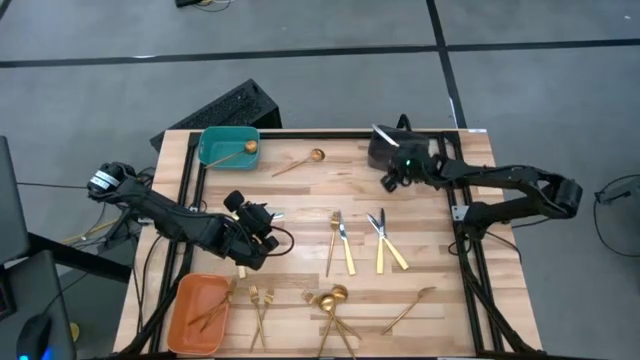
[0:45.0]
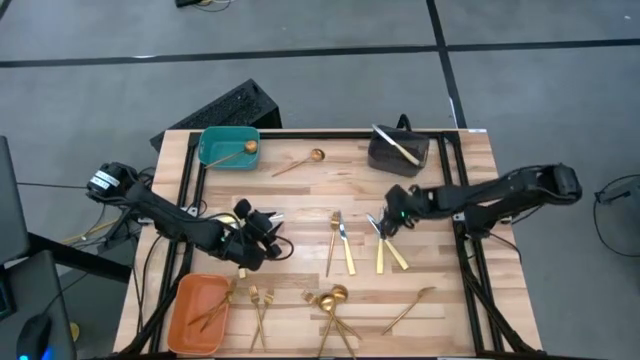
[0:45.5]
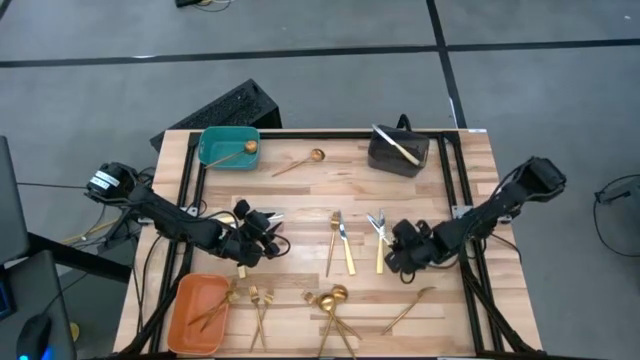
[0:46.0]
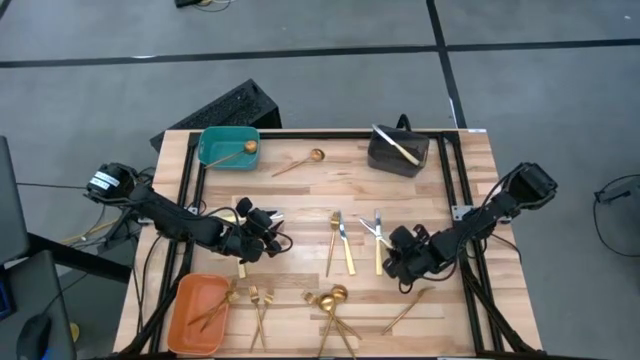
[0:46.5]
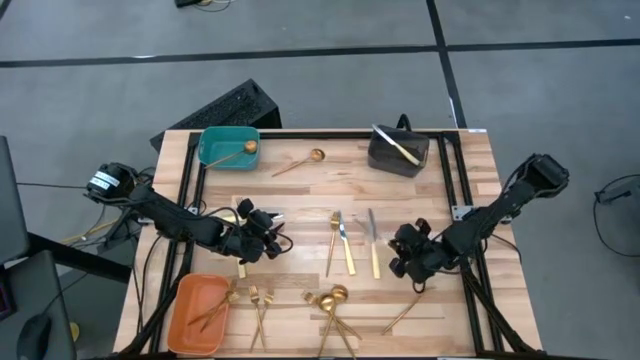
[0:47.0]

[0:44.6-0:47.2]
Task: Sort silverware by color (type)
Put the knife into the black bin

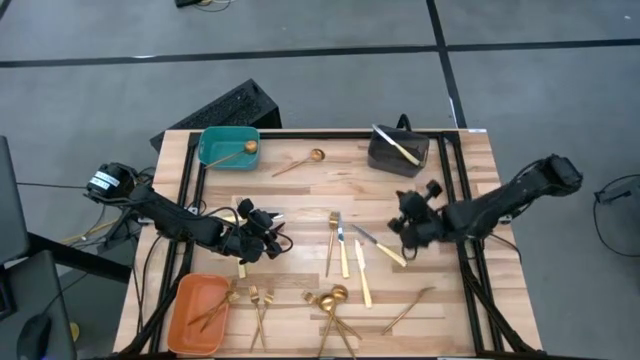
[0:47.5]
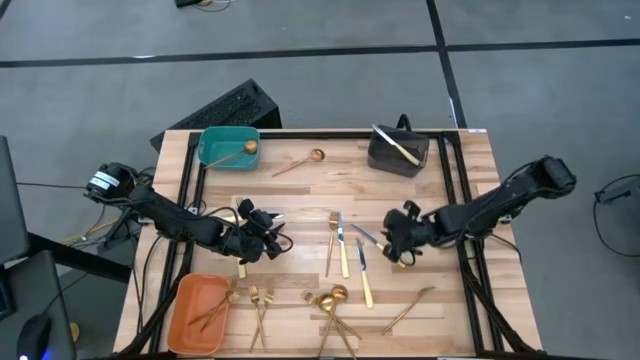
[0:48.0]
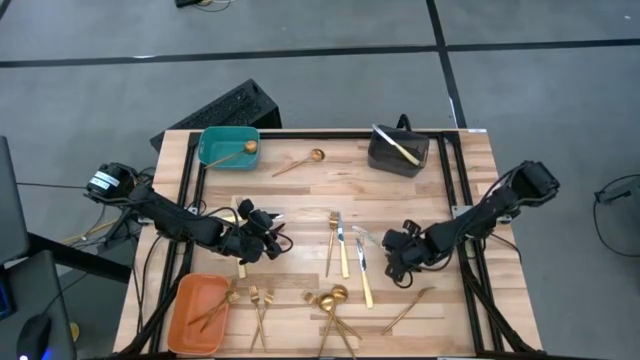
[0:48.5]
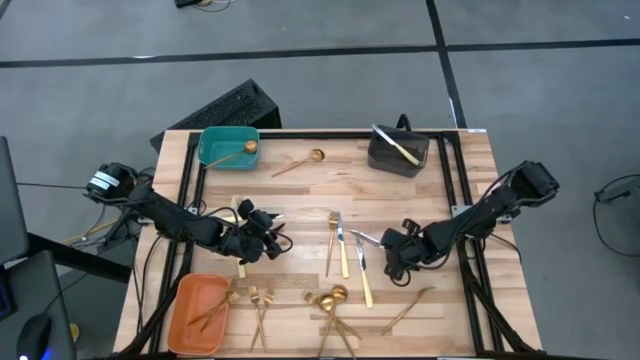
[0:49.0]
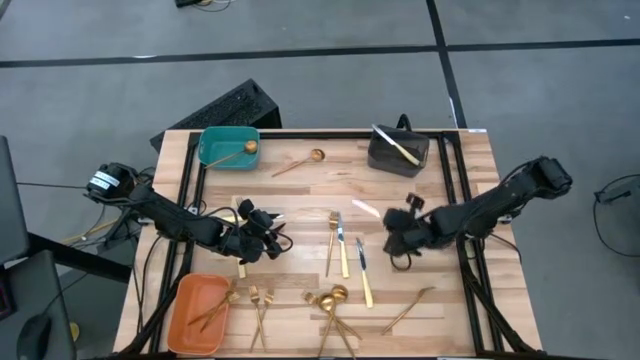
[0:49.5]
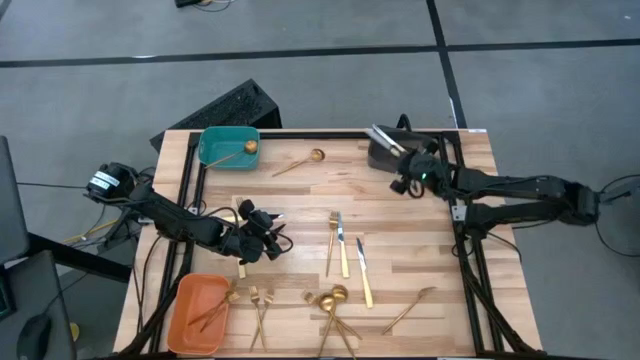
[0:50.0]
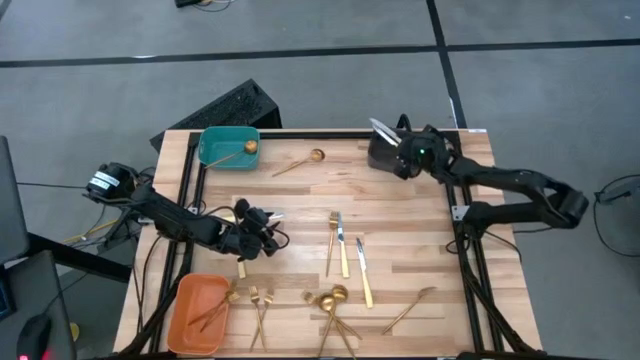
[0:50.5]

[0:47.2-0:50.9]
Put the knife into the black bin

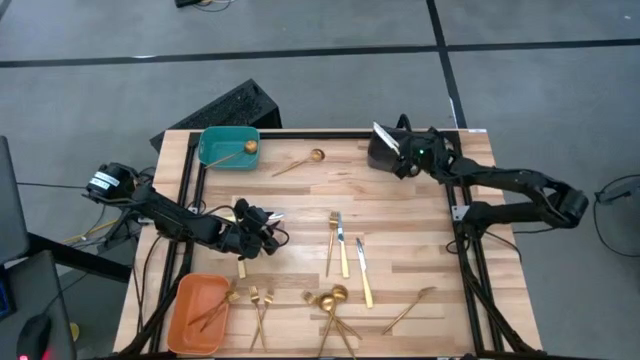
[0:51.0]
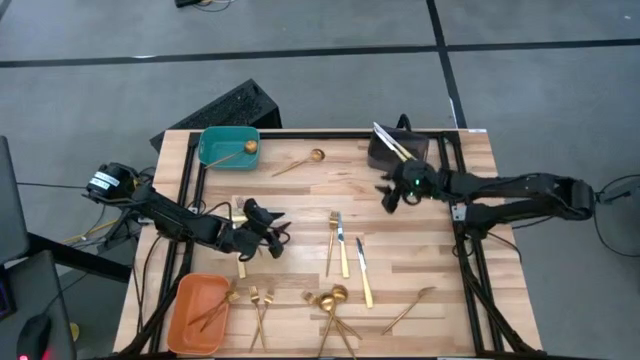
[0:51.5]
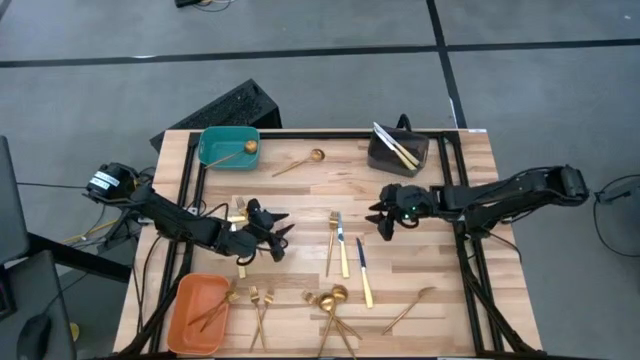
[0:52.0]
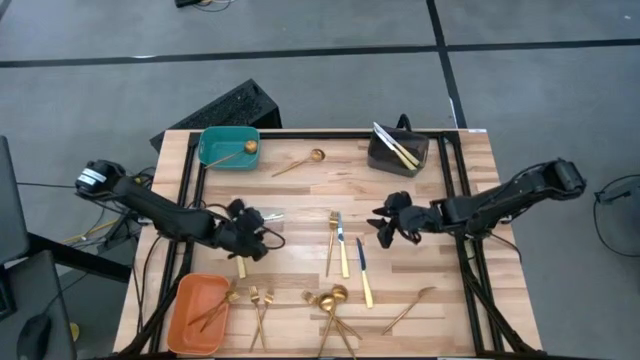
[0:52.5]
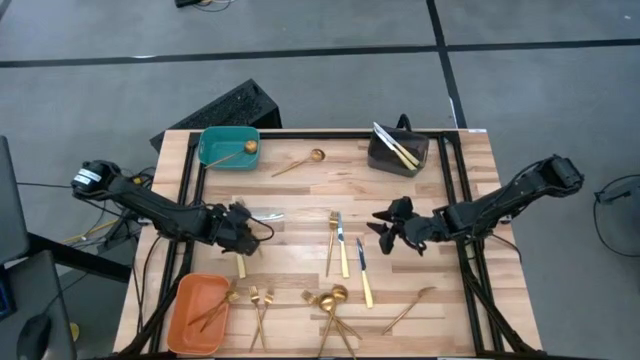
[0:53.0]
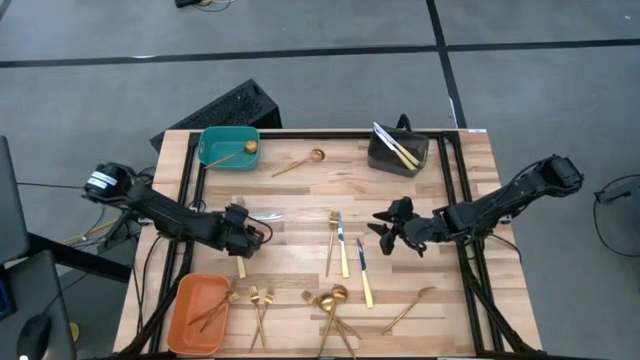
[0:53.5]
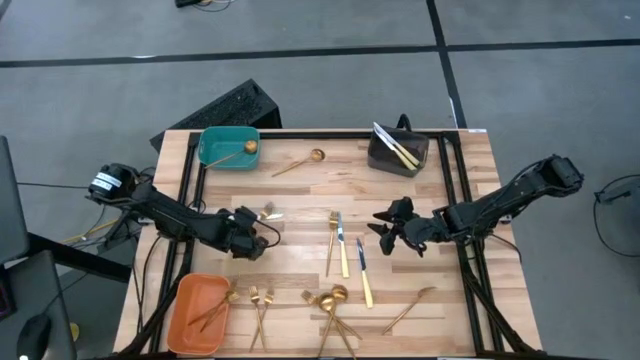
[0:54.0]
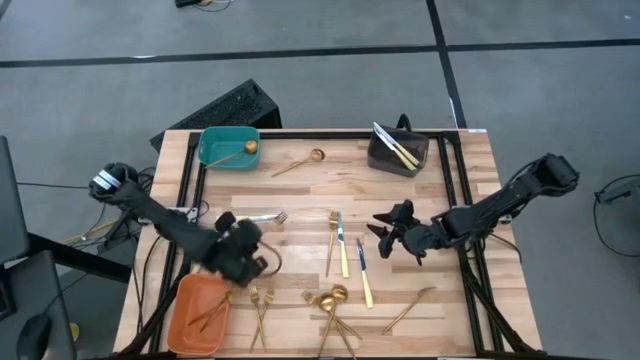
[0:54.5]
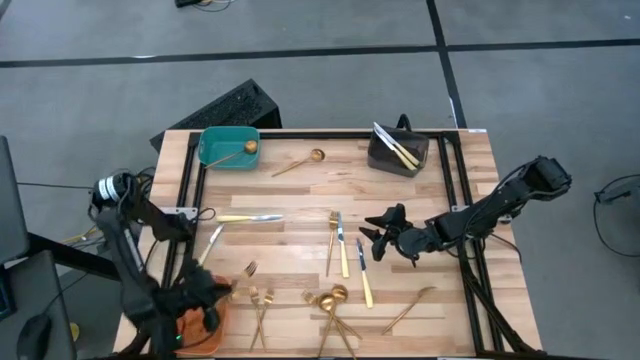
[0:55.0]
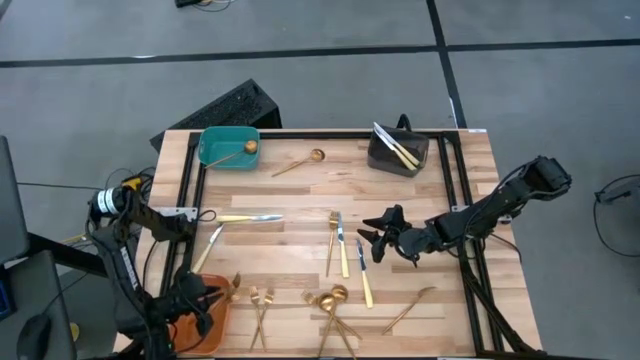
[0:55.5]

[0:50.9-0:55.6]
Put the fork into the orange bin

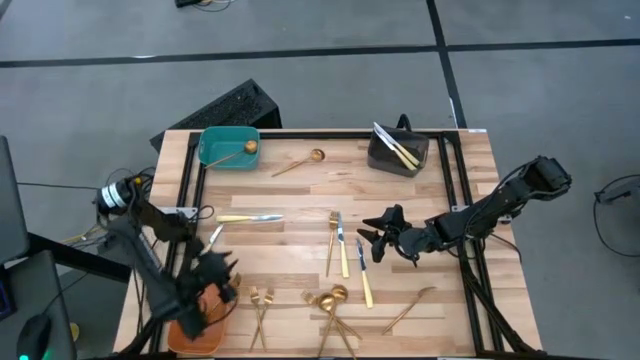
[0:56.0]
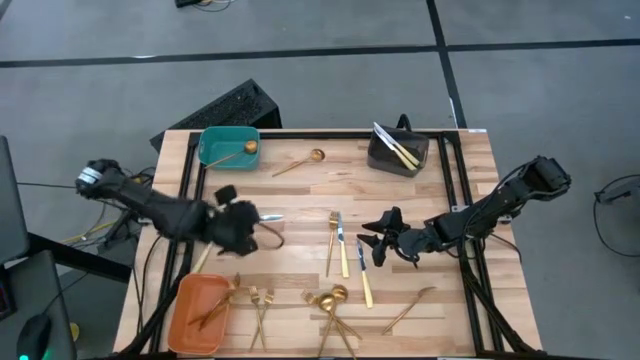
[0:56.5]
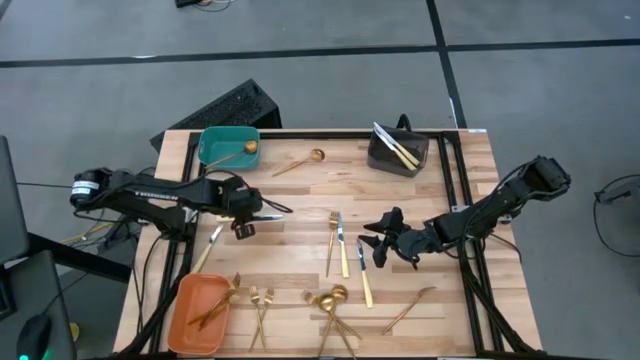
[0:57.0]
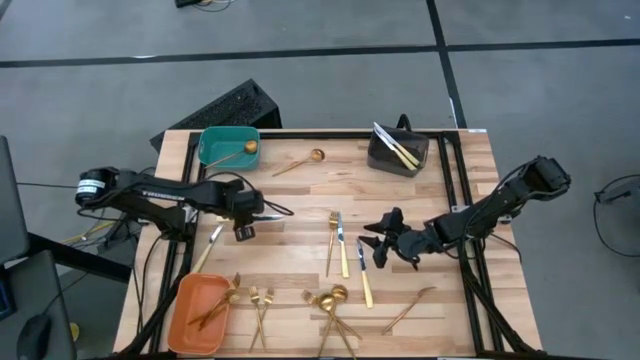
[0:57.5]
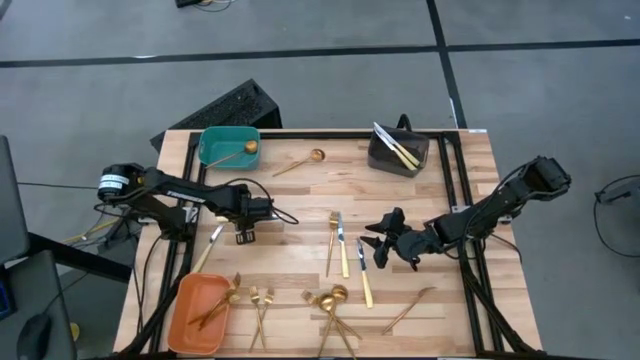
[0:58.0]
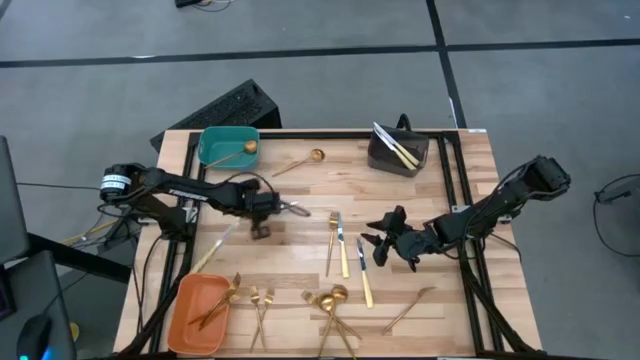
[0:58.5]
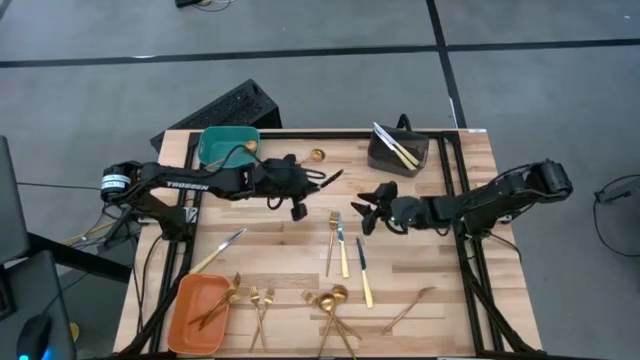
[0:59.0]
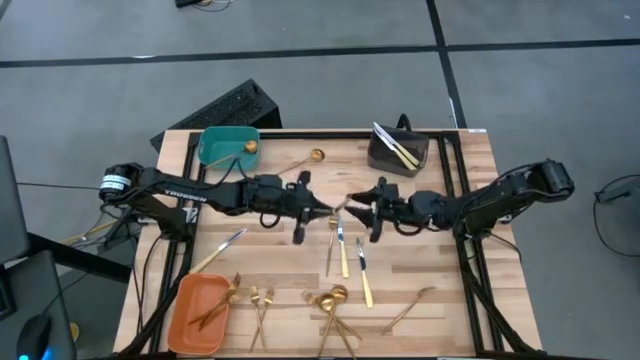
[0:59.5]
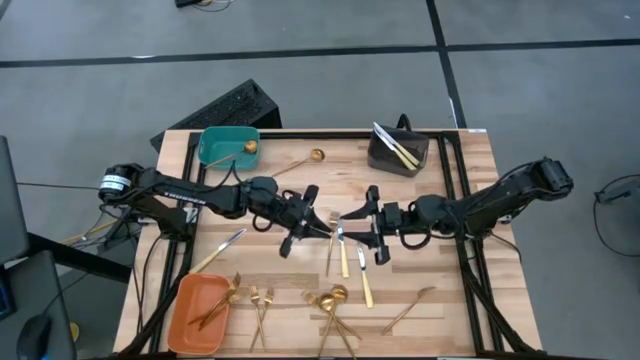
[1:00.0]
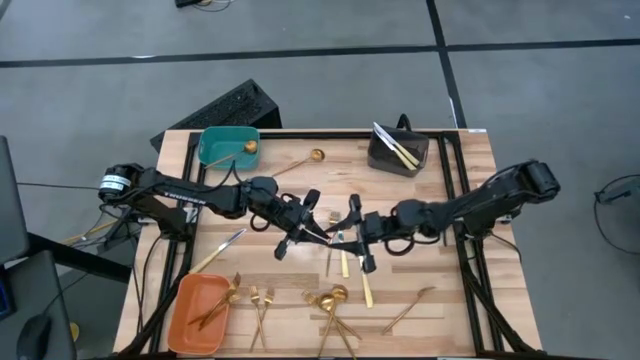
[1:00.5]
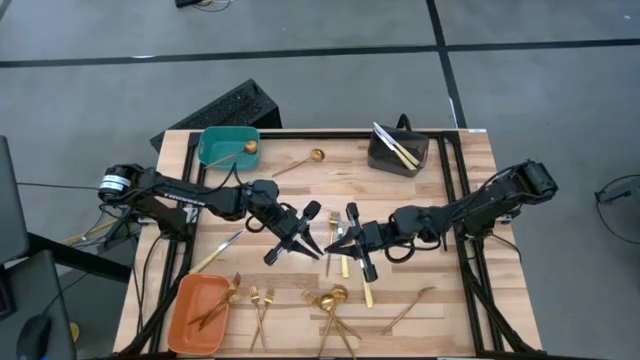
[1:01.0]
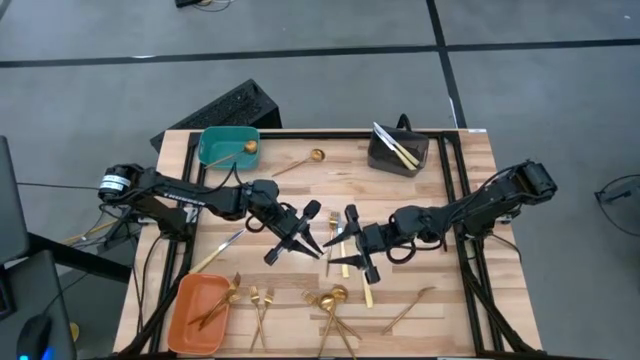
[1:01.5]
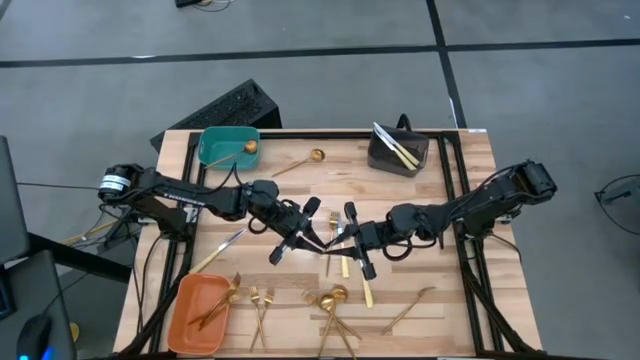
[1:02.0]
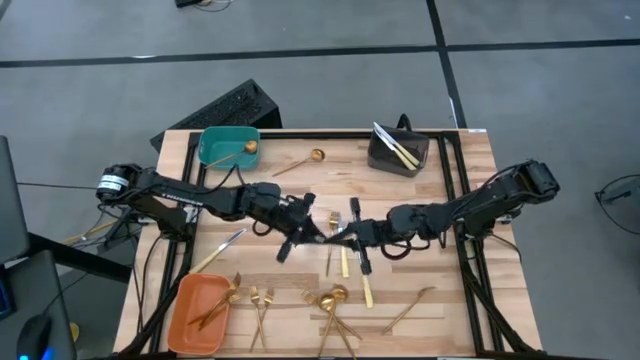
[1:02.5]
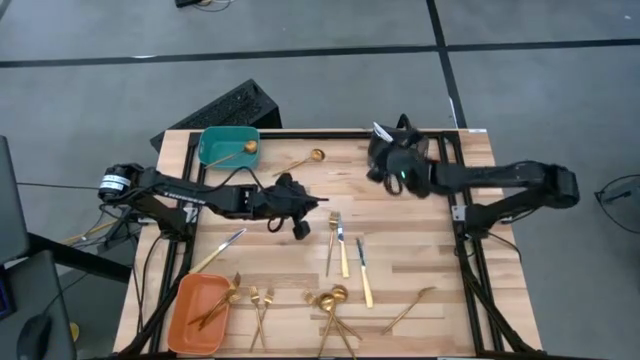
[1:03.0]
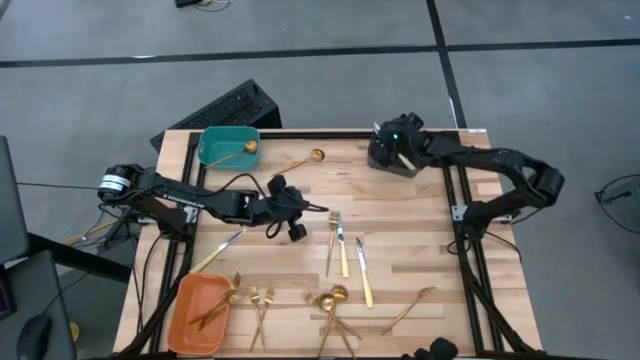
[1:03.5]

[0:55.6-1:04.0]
Put the knife into the black bin

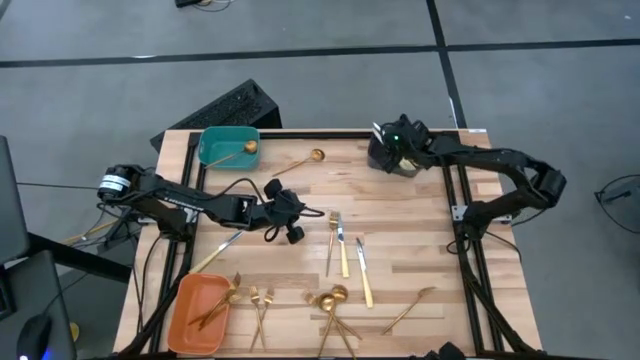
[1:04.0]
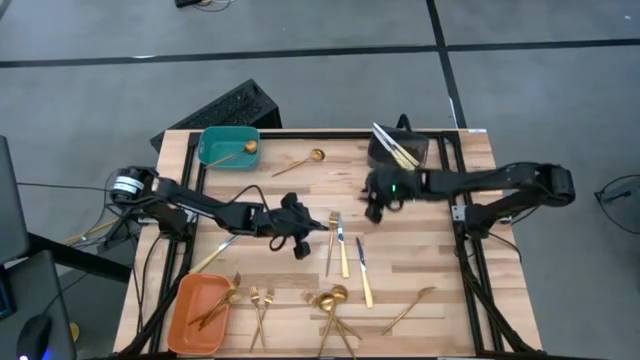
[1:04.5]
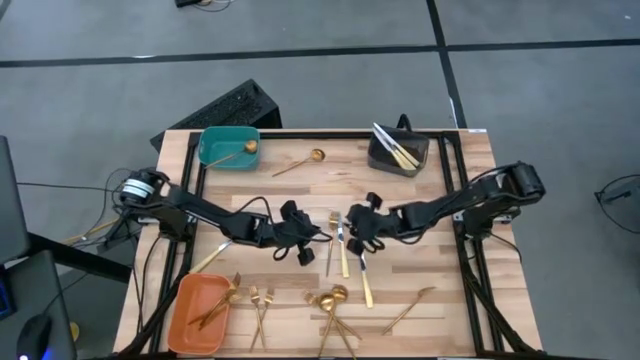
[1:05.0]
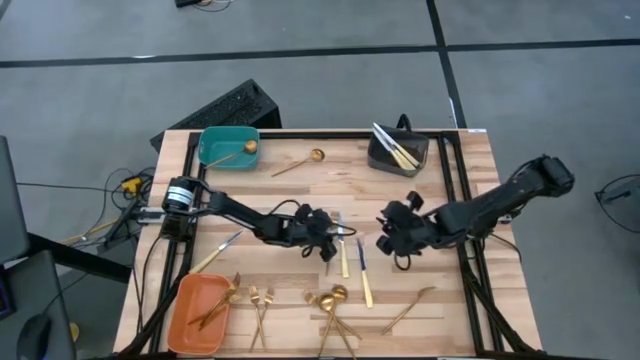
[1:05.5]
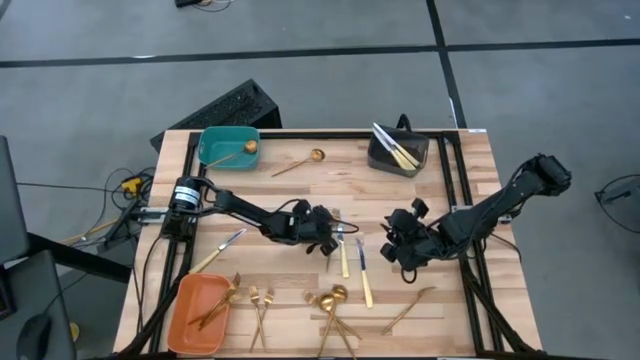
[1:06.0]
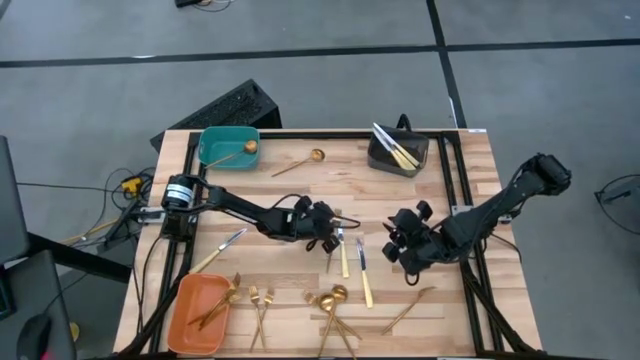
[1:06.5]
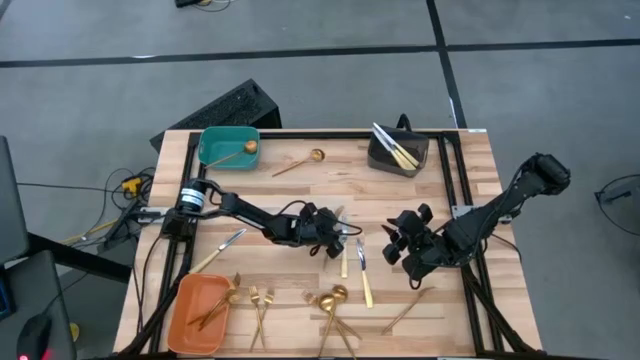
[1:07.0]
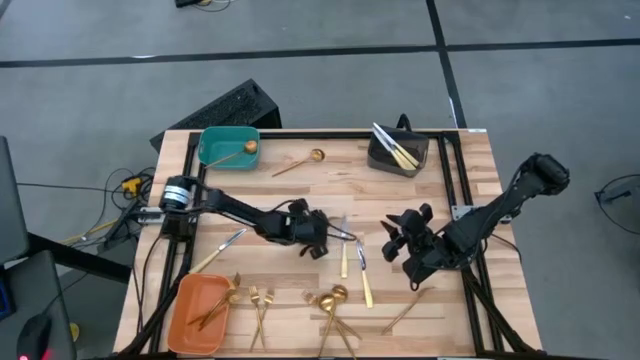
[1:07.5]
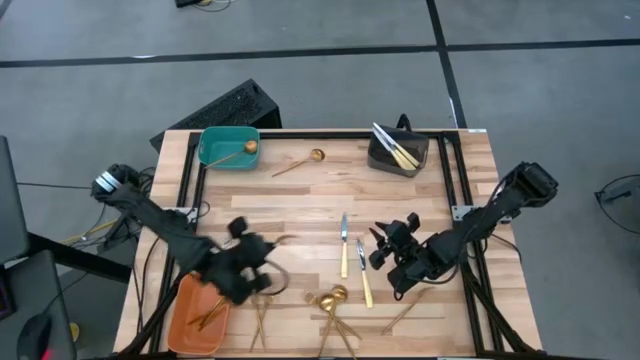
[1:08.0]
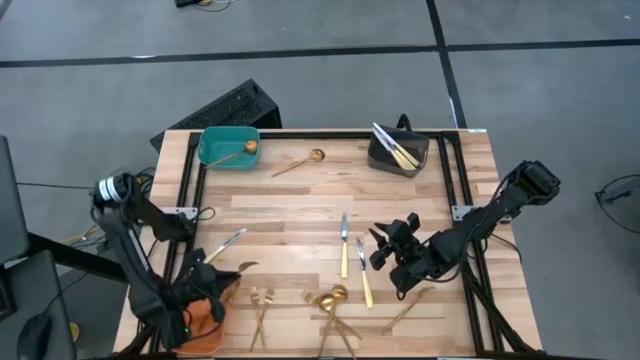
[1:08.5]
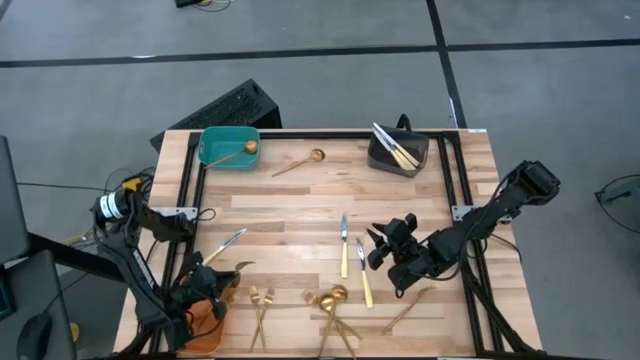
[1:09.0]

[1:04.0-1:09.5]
Put the fork into the orange bin
